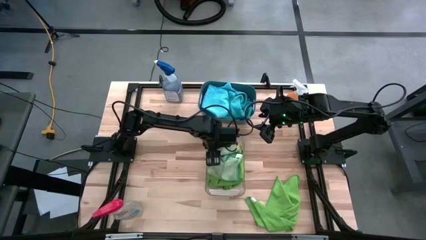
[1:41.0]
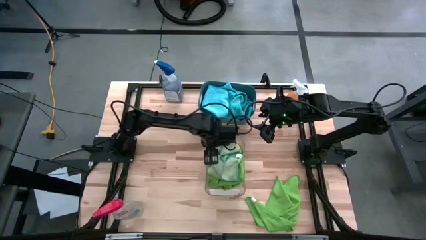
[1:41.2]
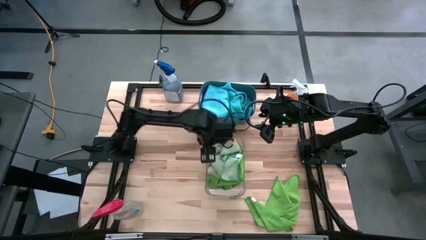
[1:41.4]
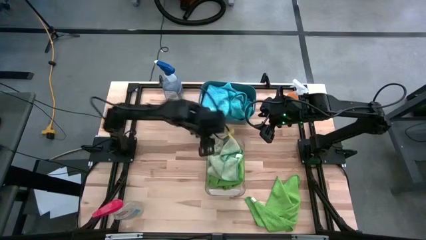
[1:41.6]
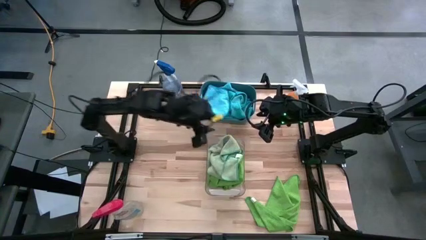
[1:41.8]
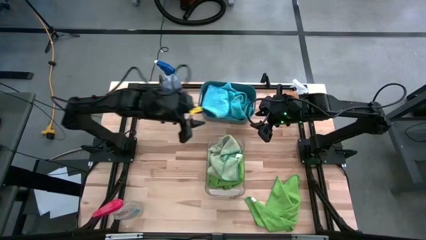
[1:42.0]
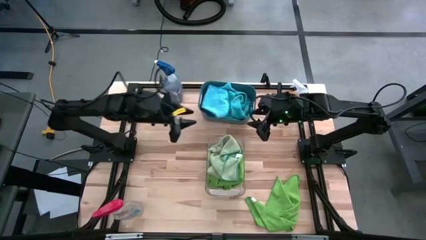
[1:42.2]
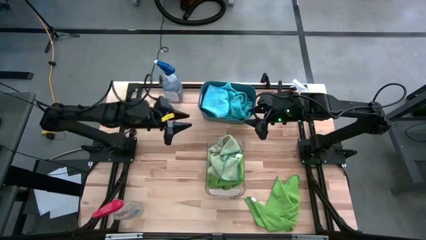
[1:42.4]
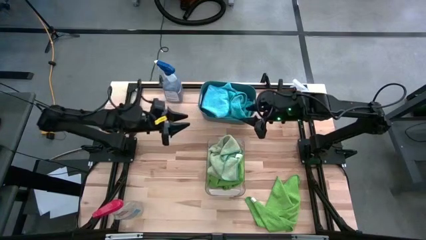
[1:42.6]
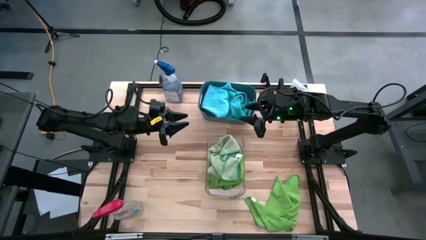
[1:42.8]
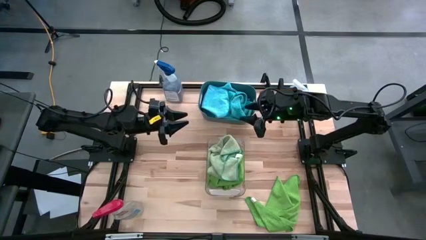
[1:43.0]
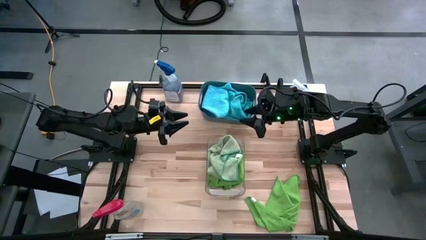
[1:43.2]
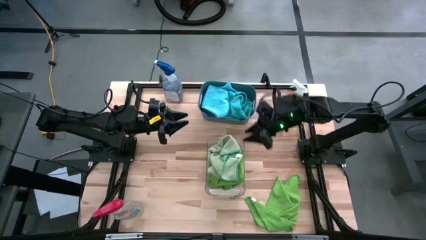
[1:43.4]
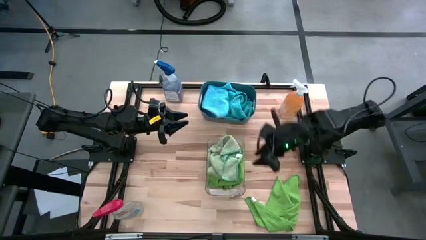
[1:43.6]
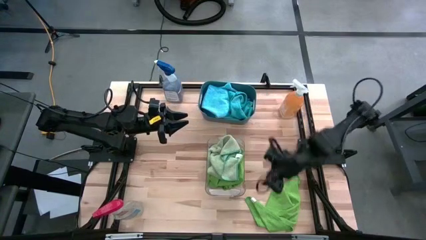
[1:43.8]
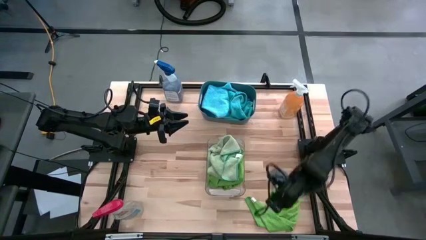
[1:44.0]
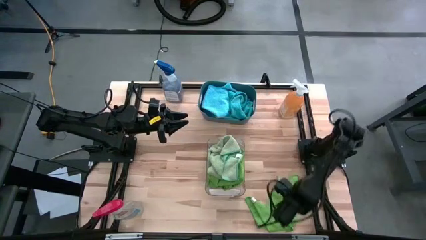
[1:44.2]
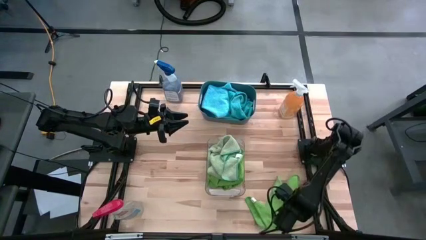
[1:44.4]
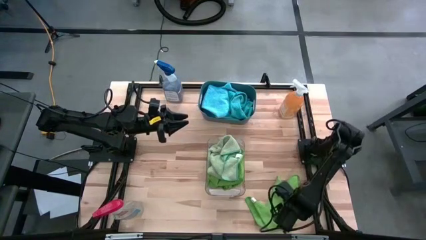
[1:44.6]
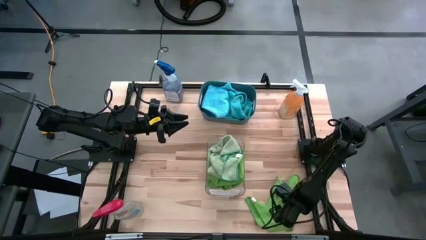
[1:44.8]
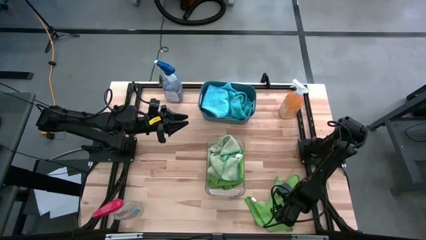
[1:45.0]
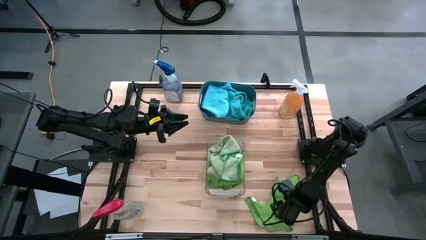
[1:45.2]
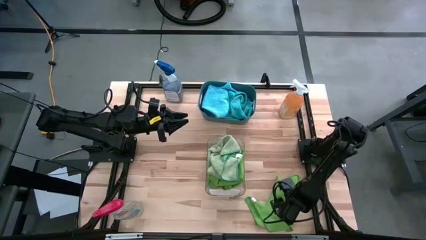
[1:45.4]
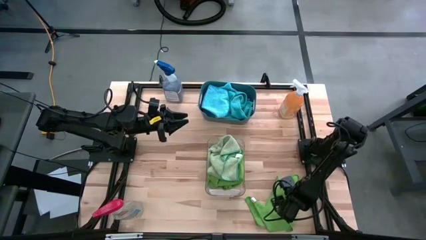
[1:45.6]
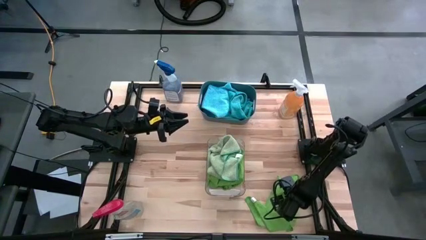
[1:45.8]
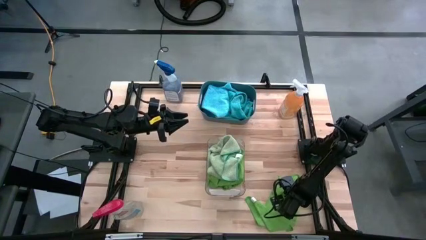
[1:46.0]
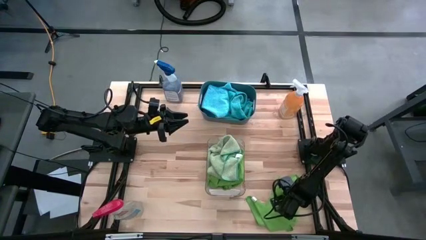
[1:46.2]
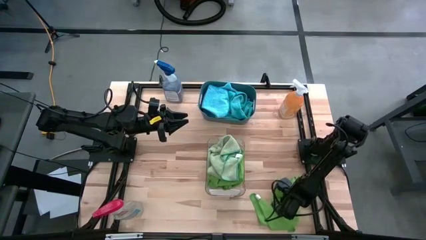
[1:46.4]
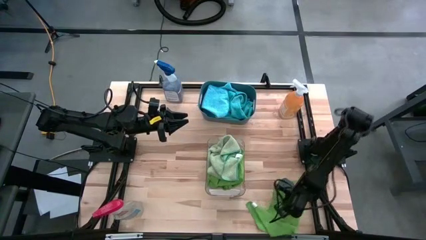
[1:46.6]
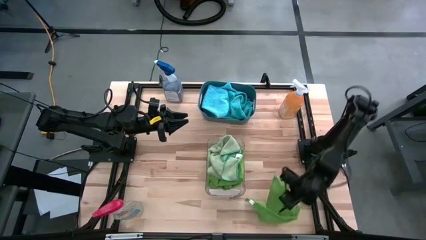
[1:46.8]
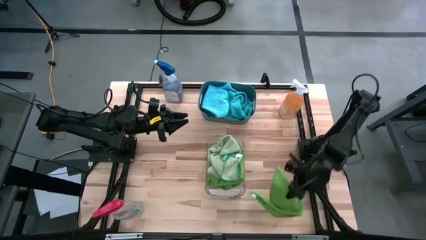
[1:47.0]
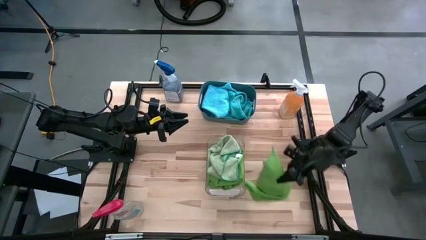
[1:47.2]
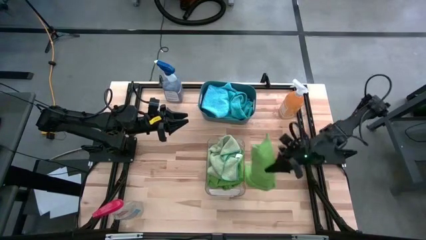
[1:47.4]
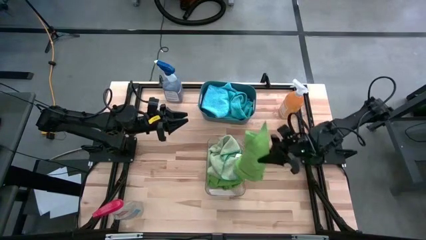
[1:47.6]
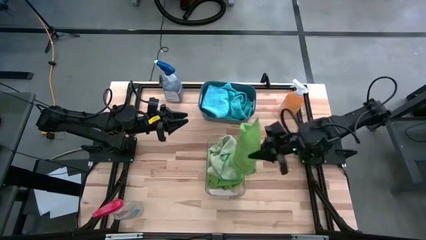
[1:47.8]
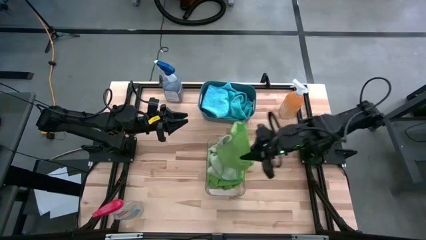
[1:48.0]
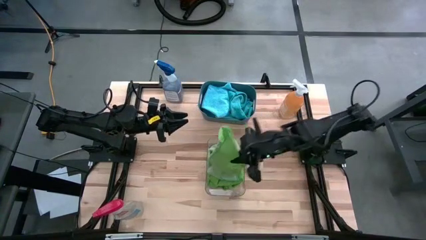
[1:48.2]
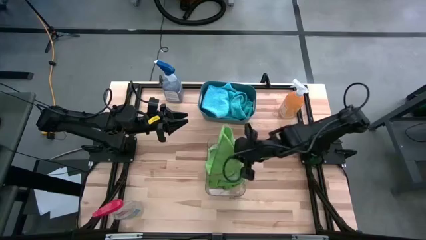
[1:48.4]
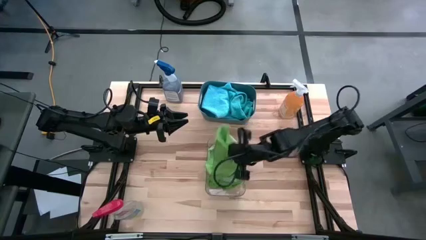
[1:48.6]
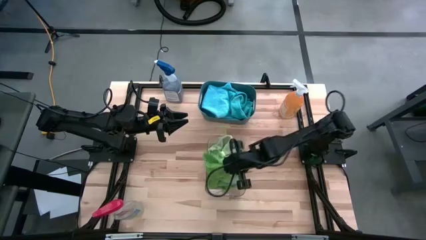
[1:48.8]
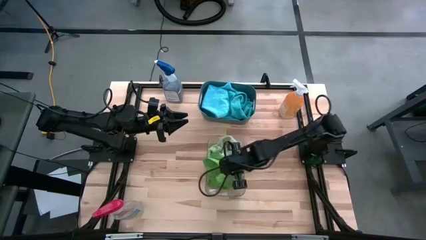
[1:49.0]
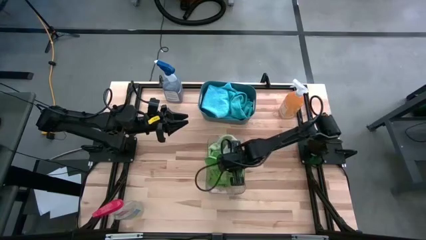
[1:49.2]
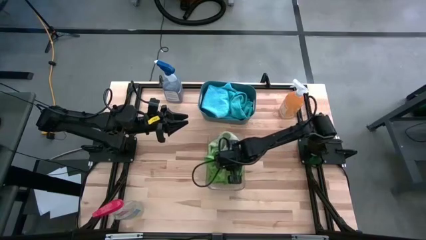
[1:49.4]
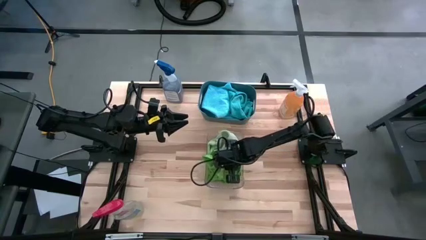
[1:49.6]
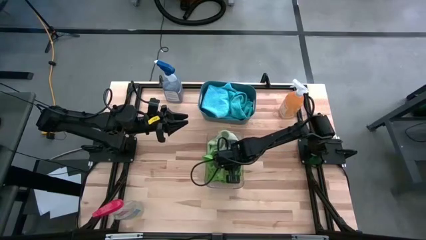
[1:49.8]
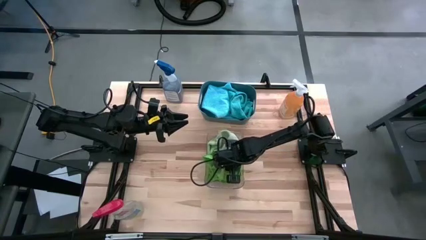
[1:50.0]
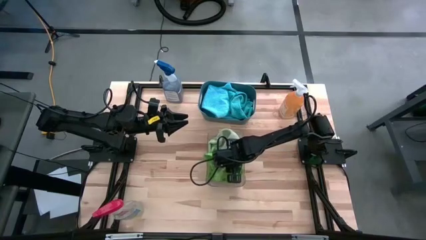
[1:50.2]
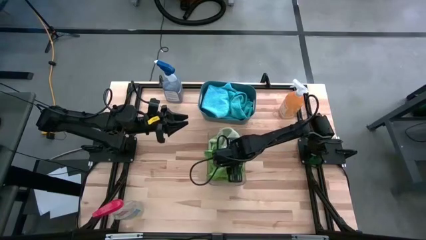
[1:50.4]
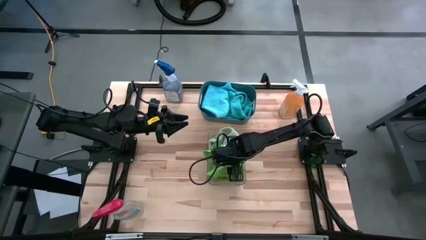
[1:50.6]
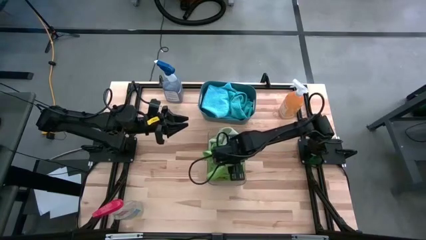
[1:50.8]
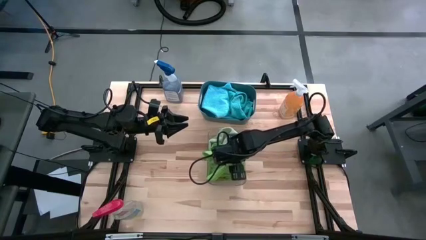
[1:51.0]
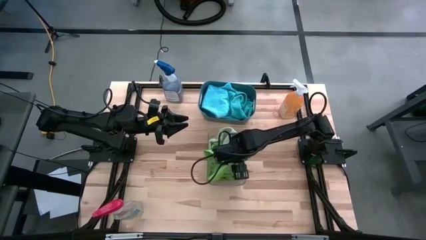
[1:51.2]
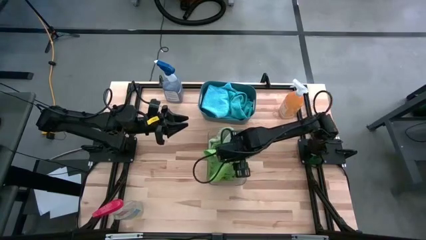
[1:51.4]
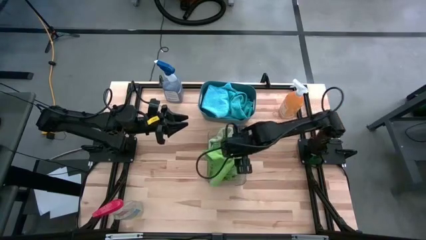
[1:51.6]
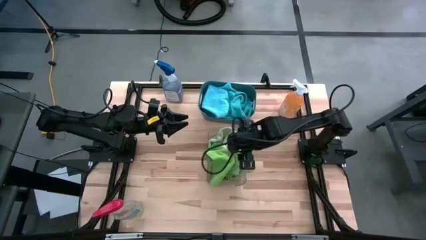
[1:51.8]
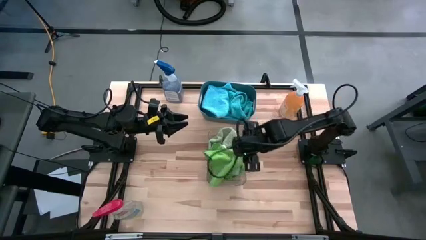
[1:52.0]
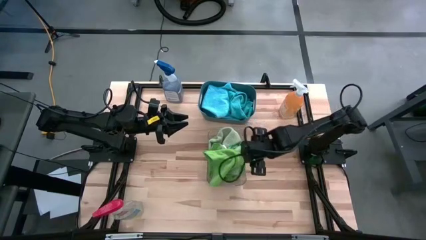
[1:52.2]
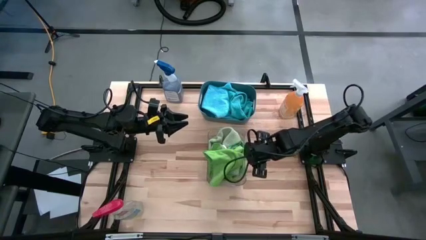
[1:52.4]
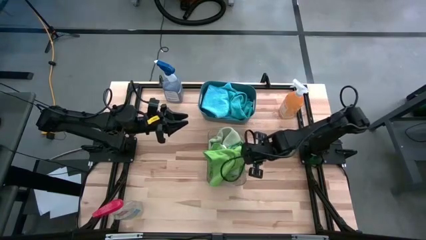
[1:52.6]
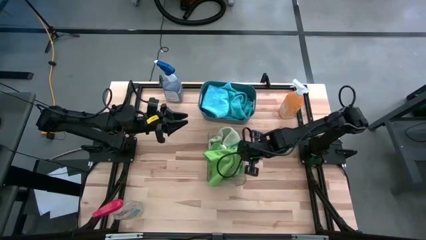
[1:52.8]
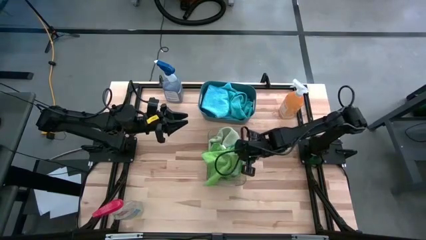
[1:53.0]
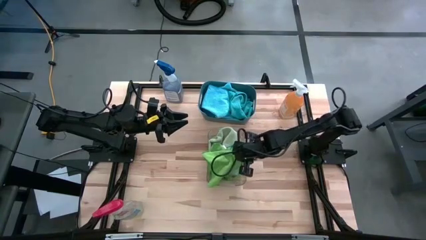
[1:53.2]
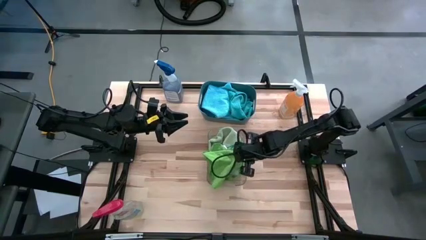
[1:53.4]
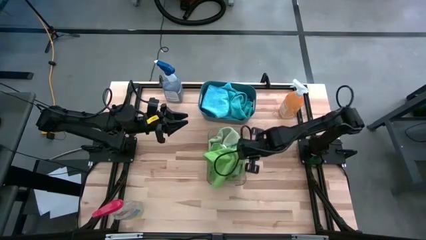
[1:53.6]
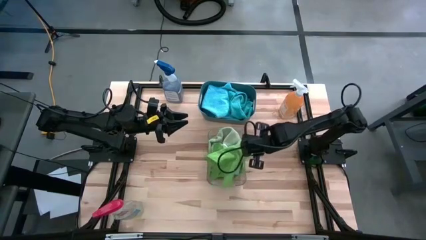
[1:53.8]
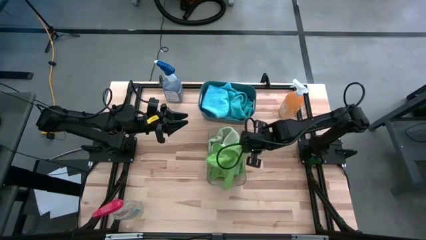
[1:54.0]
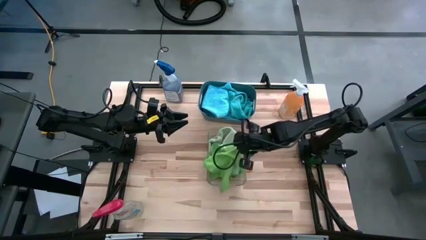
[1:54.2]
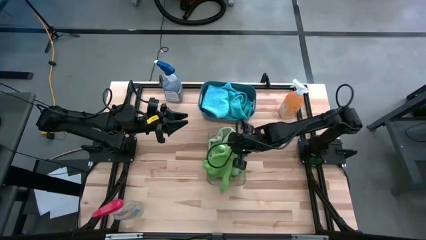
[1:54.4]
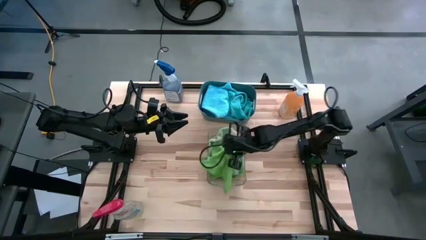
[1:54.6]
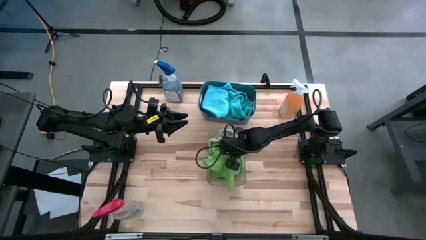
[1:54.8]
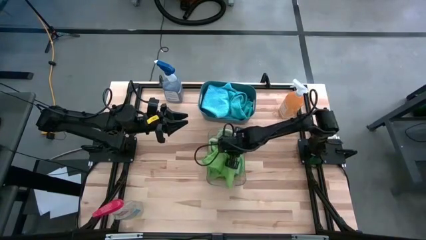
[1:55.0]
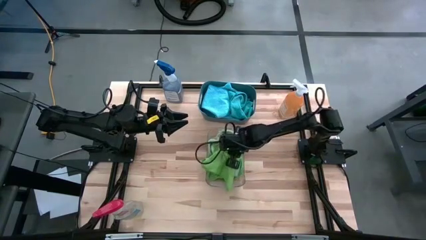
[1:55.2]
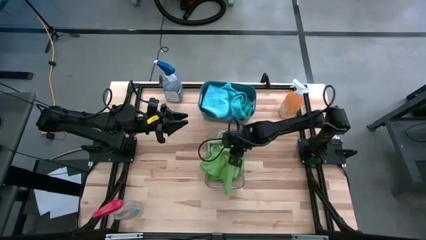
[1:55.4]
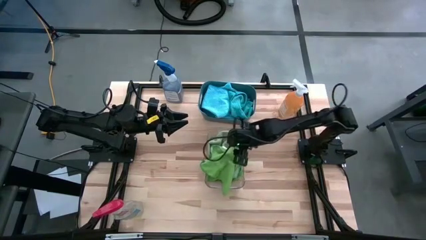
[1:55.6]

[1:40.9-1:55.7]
Task: Sort microfiber towel by color & place in baskets
Put the green microfiber towel into the transparent bin

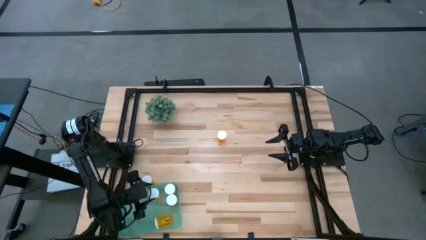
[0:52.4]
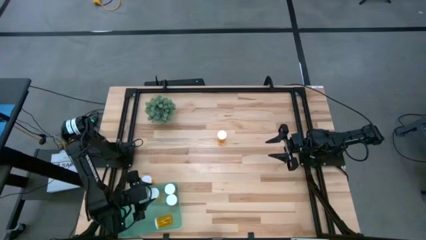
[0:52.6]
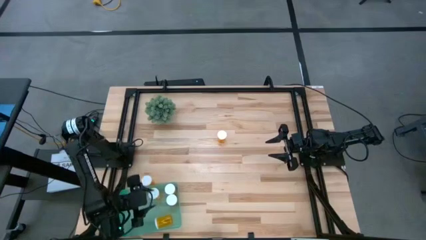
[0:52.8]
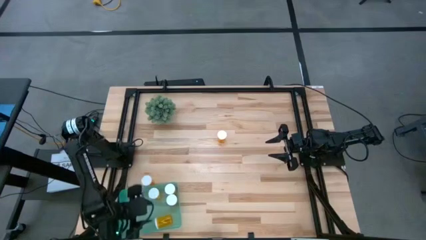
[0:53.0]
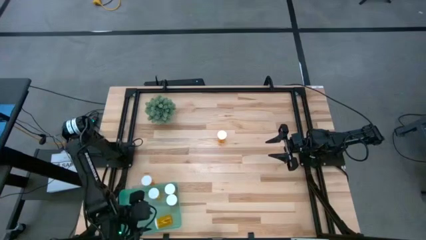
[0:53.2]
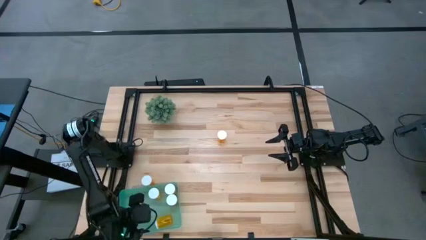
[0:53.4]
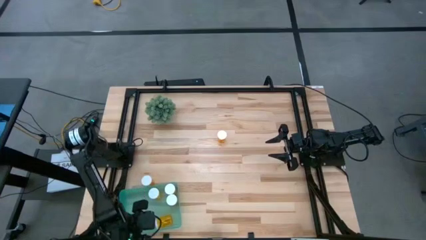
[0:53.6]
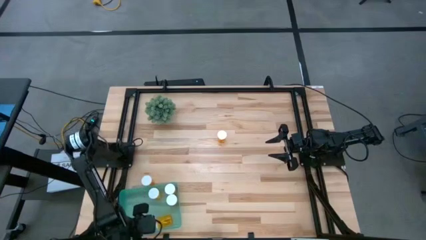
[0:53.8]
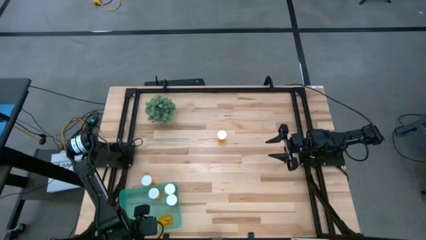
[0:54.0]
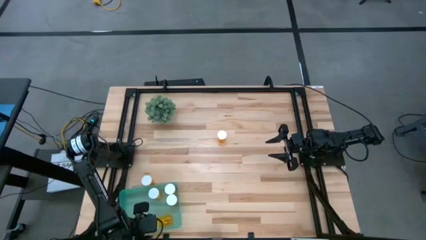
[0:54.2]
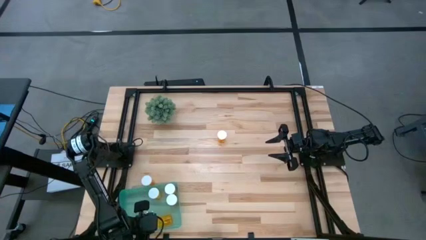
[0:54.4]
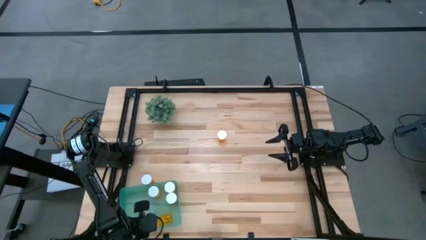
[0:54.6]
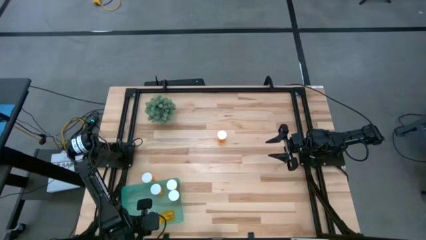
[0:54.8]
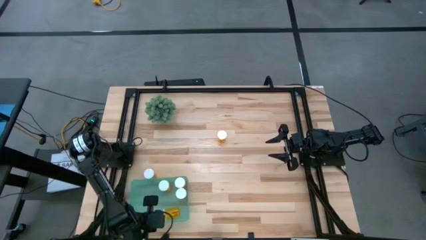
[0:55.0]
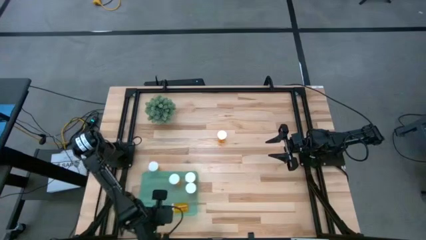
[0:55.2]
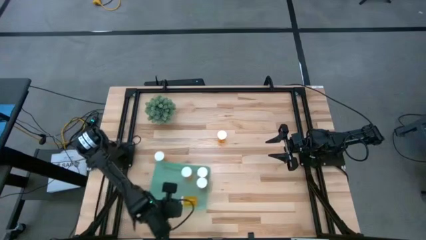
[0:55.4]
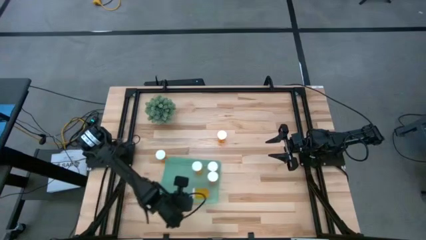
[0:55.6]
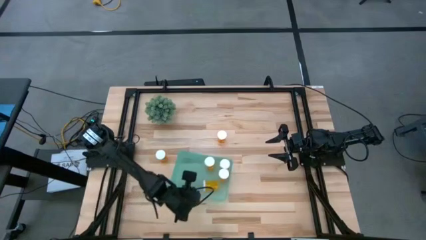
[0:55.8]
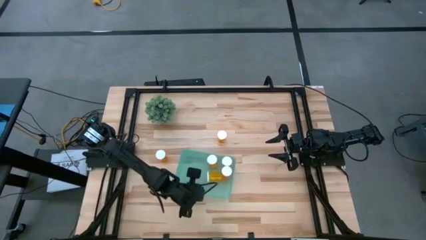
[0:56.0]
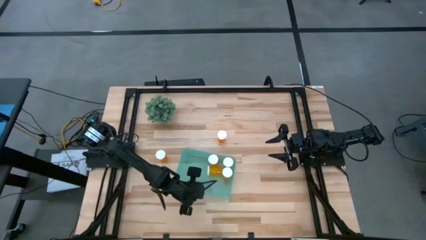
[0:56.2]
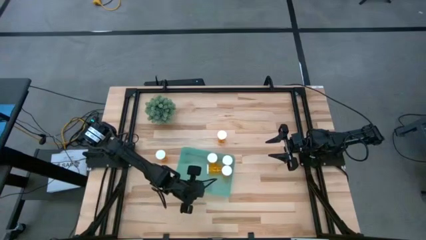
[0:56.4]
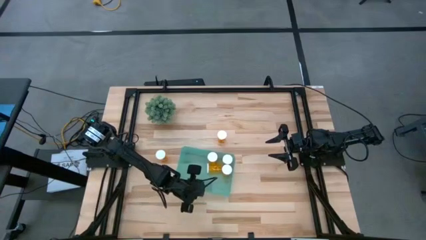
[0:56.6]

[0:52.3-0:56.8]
Task: Pick and place pill bottles into a basket
Move the green bin to the center of the table
